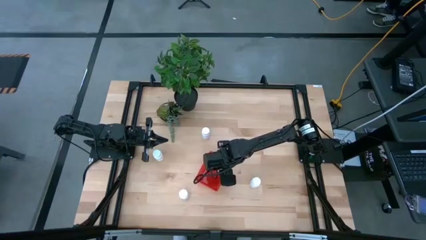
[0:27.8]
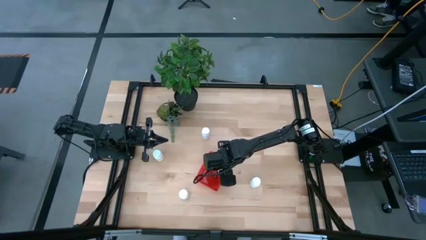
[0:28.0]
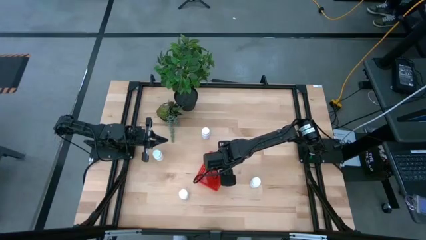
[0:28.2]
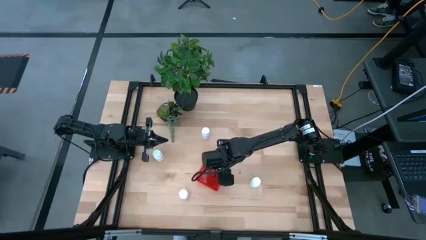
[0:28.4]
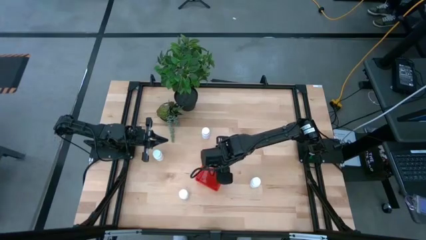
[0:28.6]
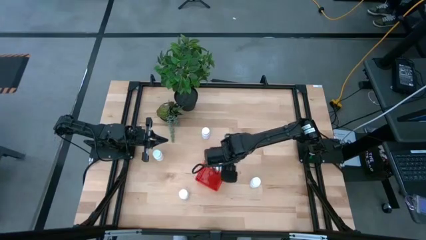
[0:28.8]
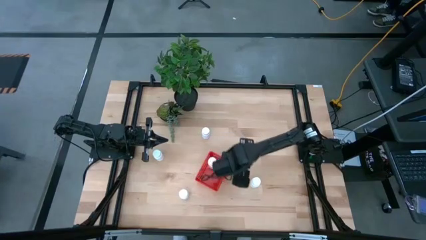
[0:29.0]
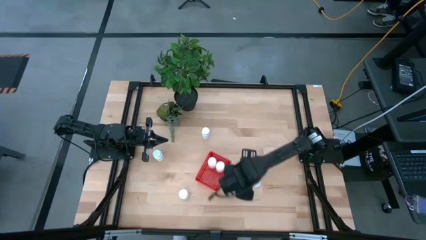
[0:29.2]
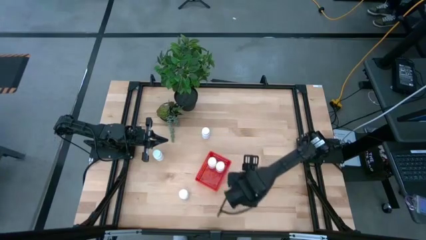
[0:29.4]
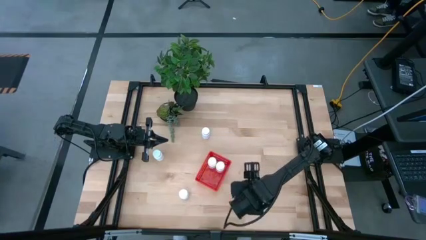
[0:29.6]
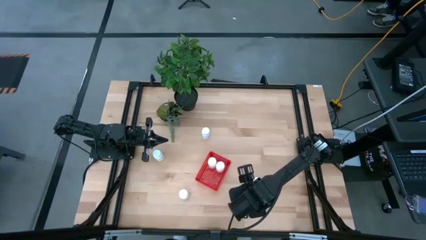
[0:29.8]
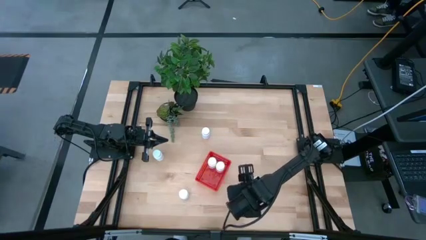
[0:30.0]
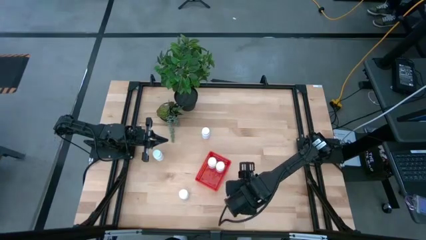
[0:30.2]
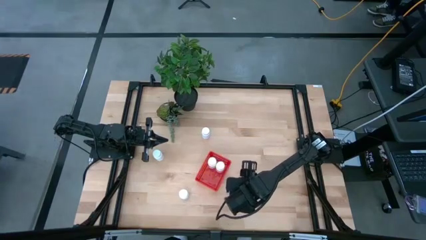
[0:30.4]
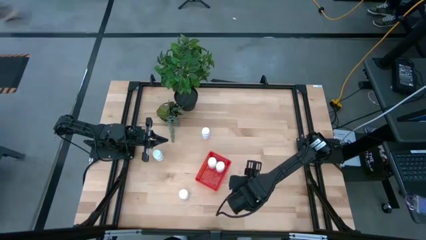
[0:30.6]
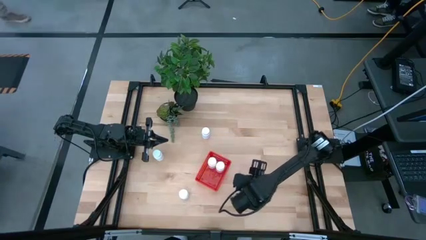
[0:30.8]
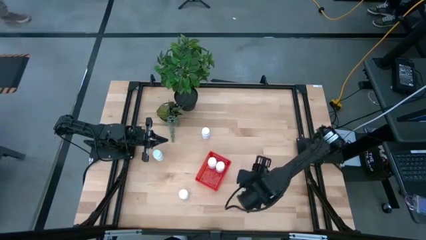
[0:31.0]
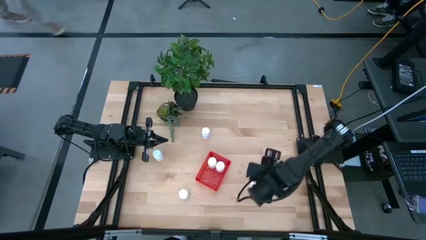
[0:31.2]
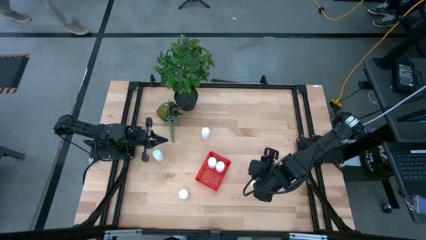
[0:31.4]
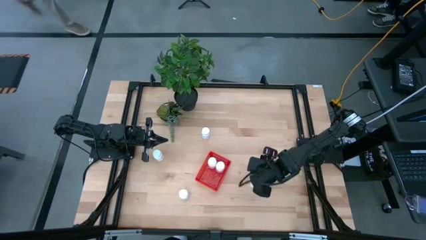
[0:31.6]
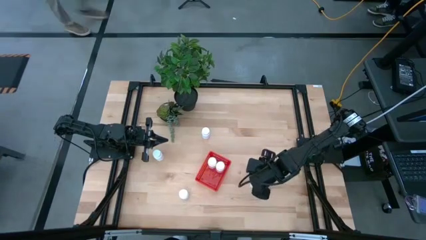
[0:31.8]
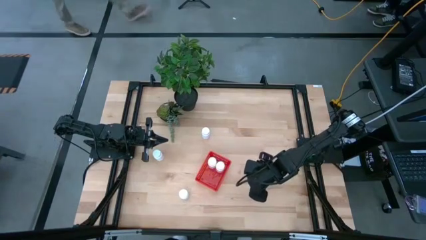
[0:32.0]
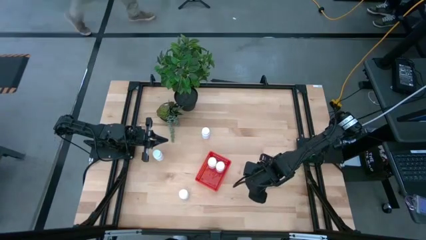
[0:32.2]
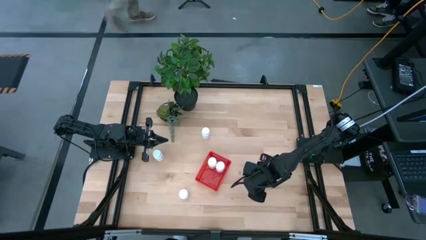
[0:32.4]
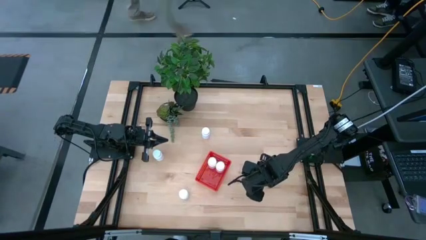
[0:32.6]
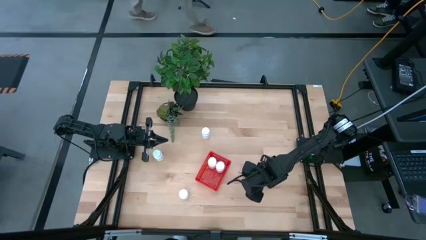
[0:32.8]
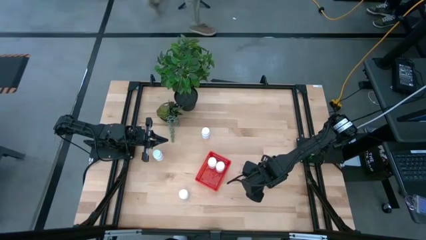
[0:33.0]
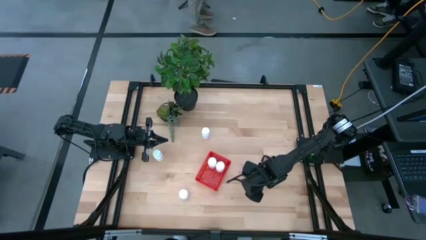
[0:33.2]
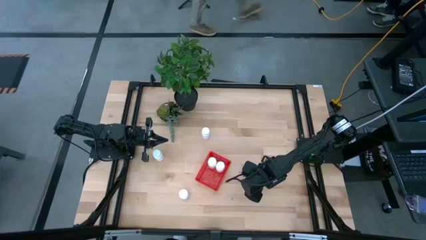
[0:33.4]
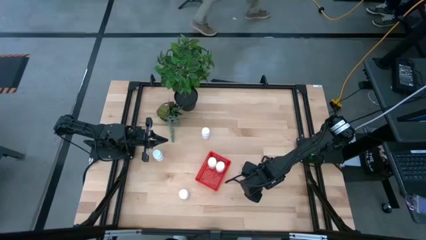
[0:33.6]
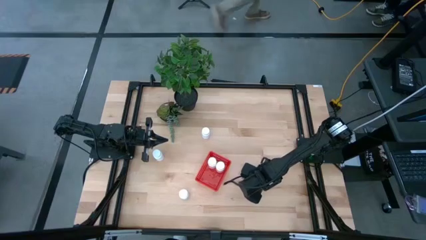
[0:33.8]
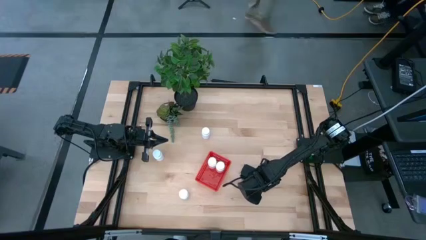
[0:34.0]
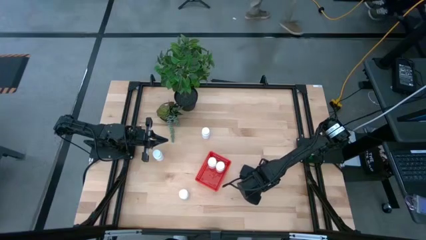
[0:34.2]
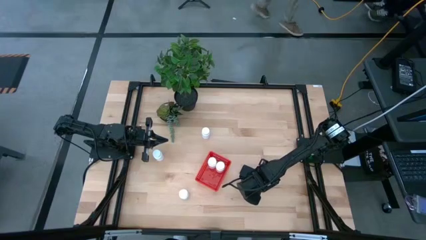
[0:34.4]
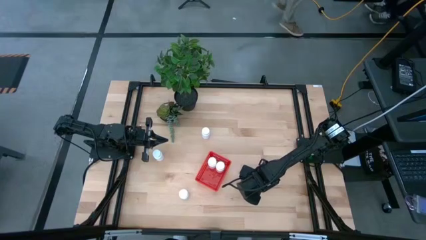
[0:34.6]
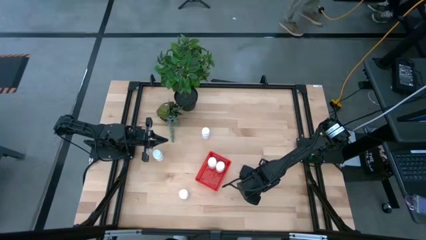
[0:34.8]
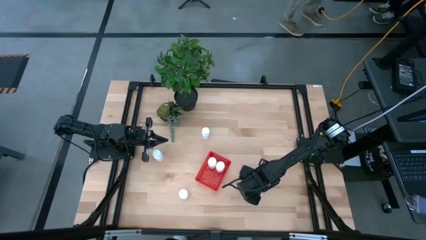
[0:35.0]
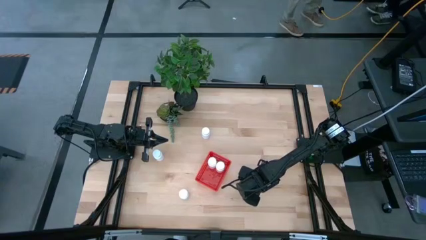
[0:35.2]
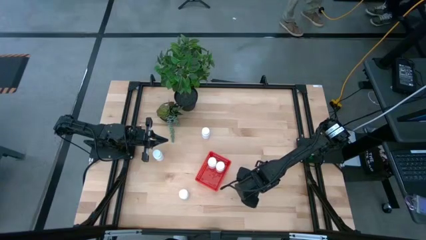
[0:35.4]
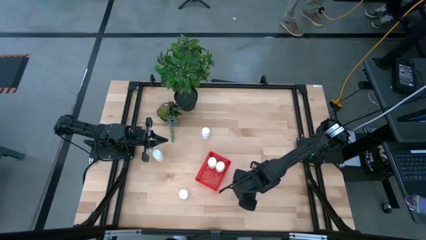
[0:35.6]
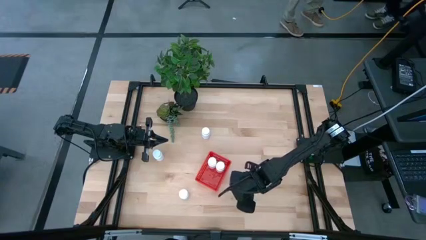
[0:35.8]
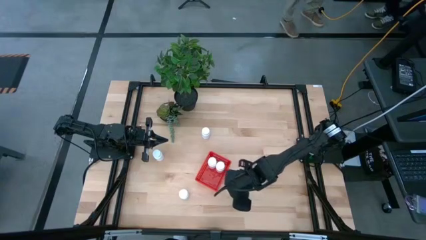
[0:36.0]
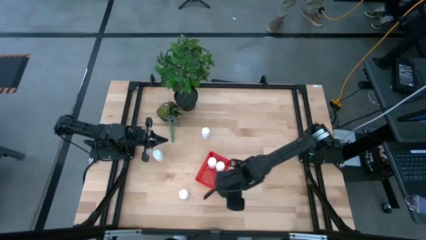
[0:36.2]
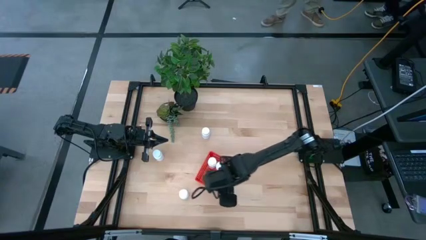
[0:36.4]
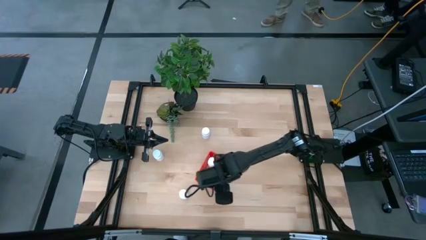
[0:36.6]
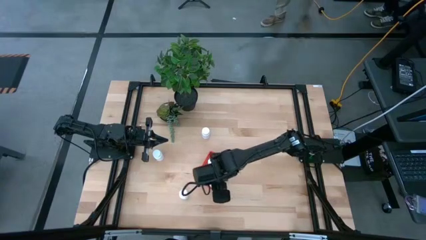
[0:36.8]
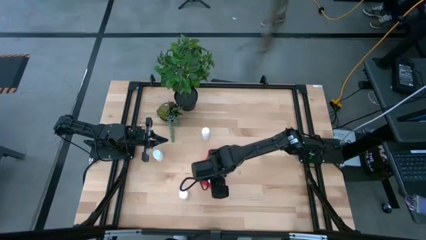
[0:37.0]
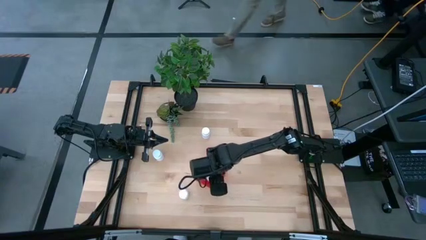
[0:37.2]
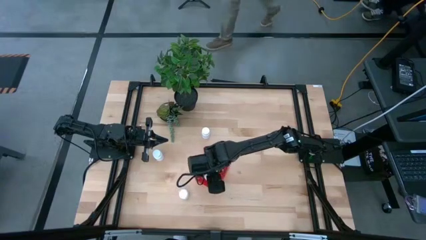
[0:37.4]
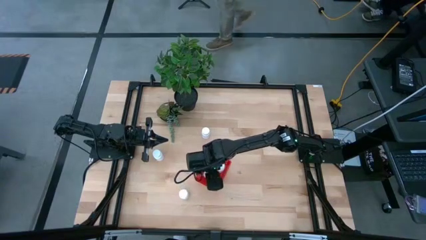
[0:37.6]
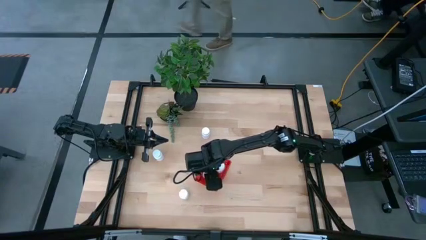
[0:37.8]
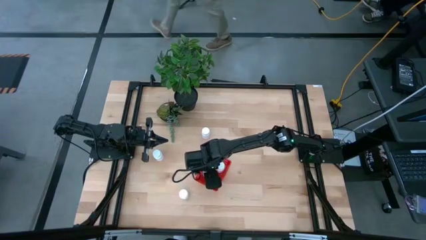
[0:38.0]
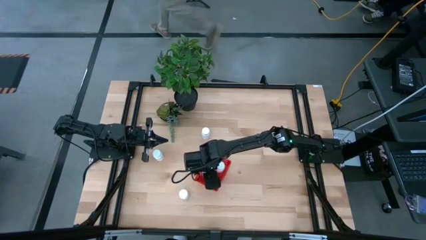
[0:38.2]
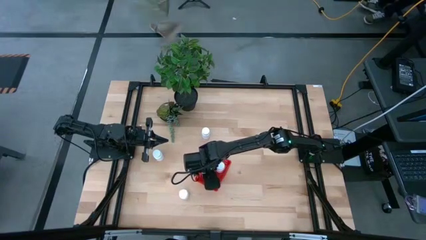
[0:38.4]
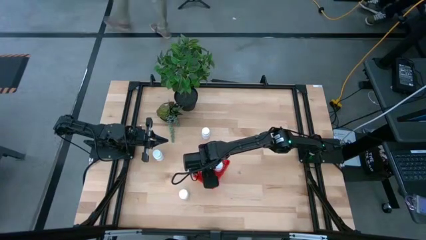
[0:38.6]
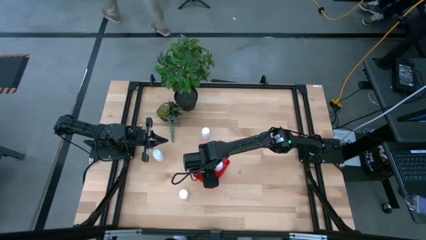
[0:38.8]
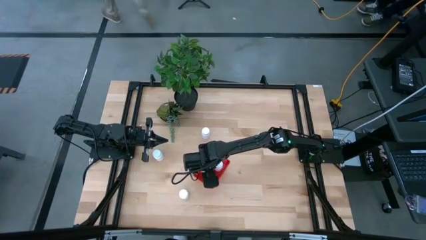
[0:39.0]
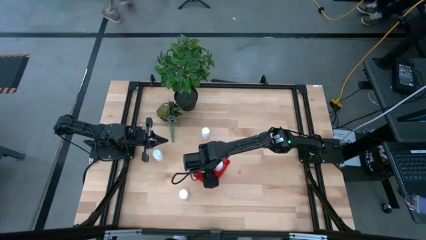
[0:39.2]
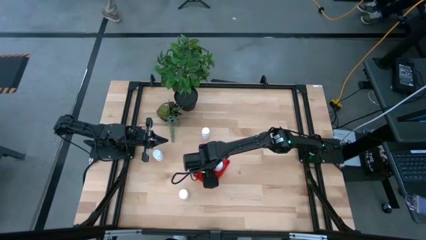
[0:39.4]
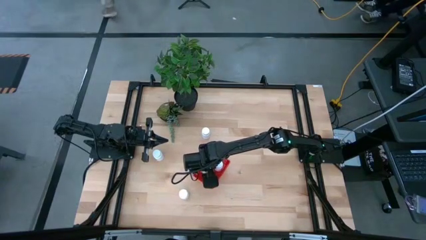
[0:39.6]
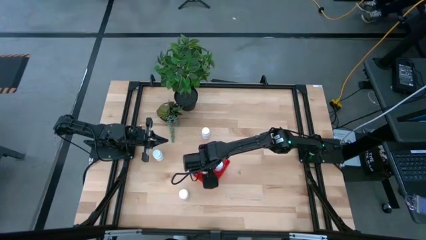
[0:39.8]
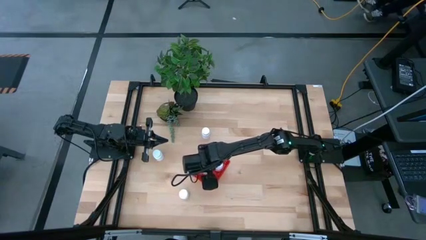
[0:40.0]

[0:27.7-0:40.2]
Task: Pick and place pill bottles into a basket
Put the white medicine bottle into the red bin

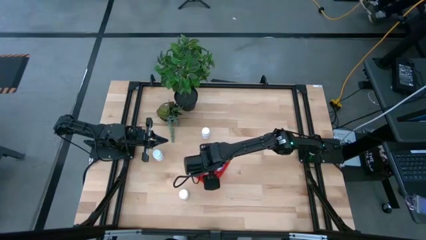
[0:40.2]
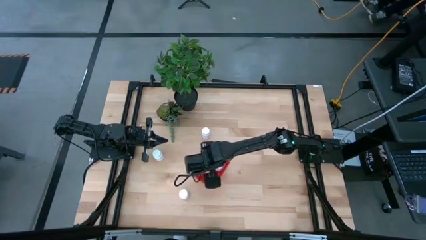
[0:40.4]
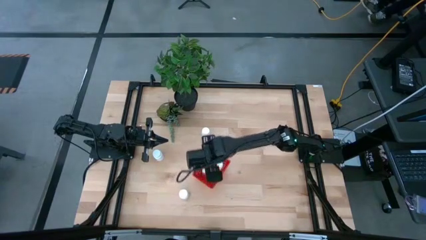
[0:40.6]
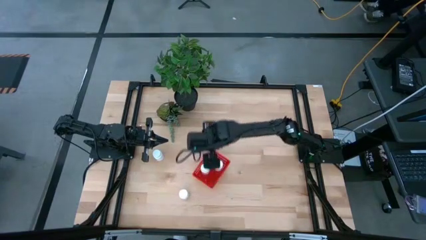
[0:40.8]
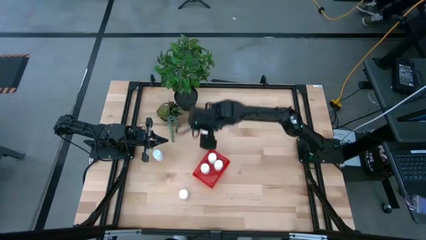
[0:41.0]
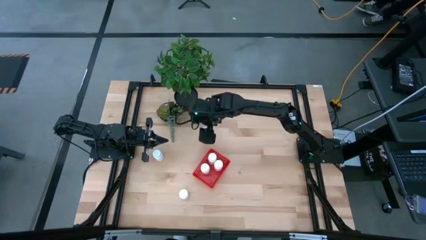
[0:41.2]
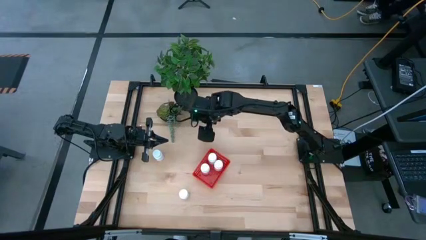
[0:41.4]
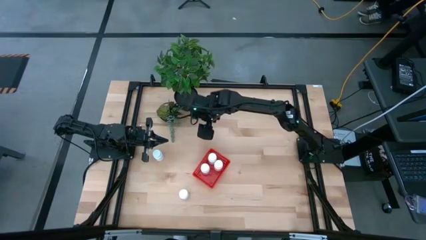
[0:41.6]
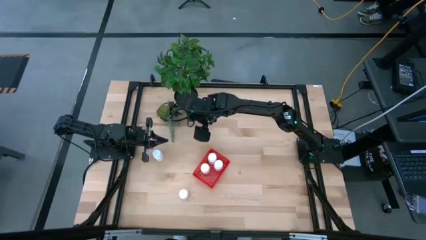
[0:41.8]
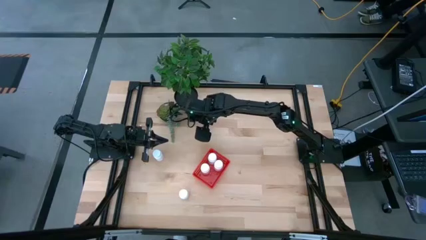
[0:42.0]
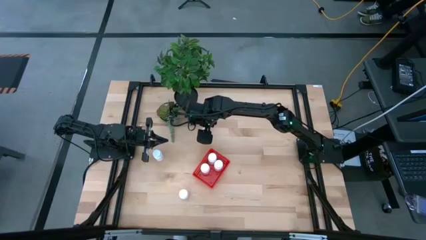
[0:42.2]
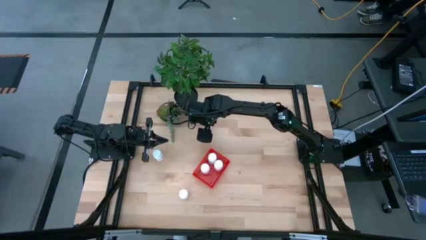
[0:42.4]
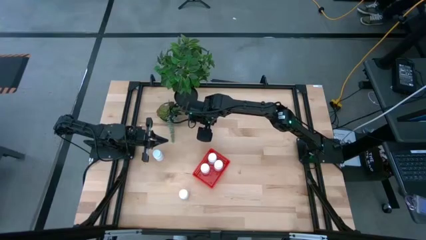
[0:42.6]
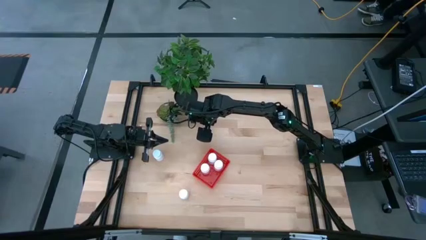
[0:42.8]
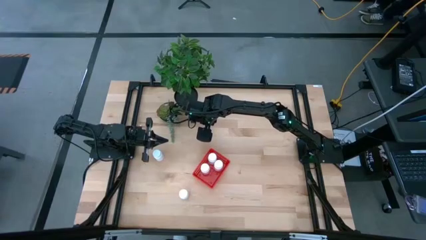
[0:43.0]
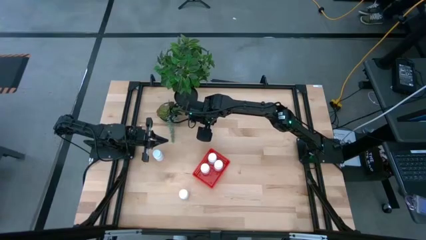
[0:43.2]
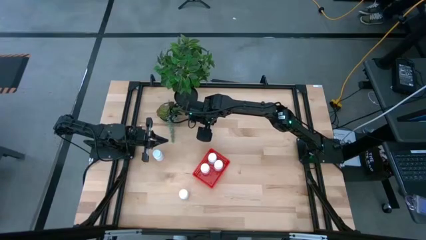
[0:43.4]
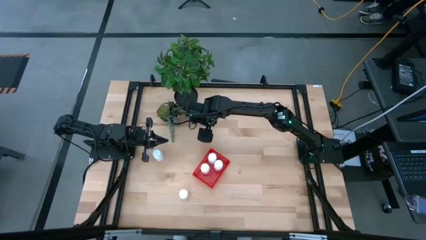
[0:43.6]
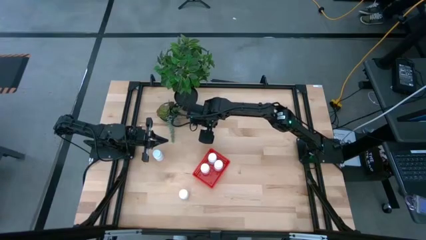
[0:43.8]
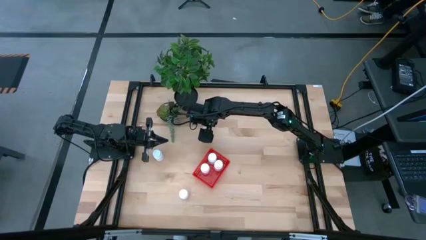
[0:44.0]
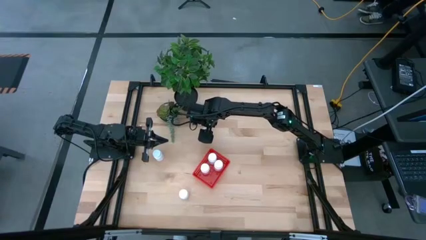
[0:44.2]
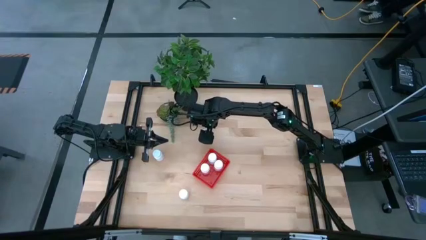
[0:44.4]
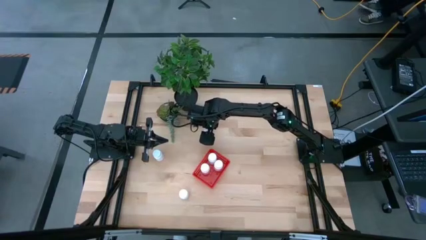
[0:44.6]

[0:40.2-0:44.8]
Put the top right white medicine bottle into the red bin
